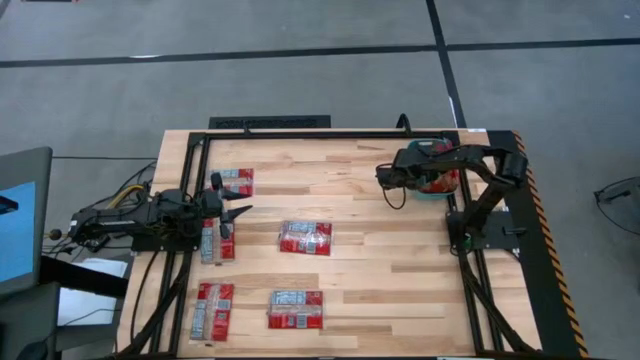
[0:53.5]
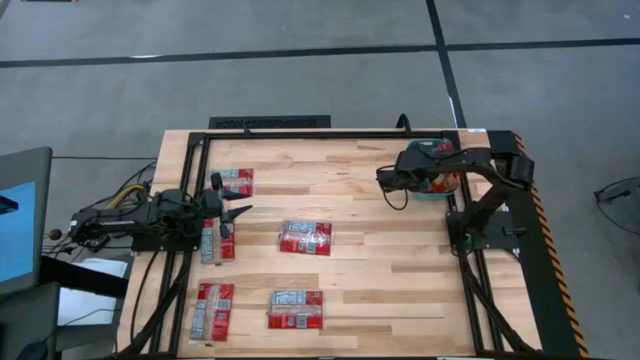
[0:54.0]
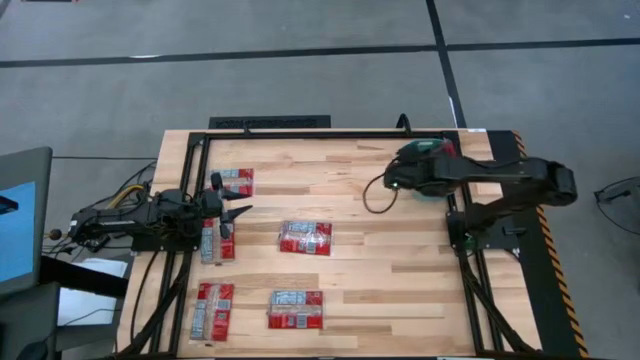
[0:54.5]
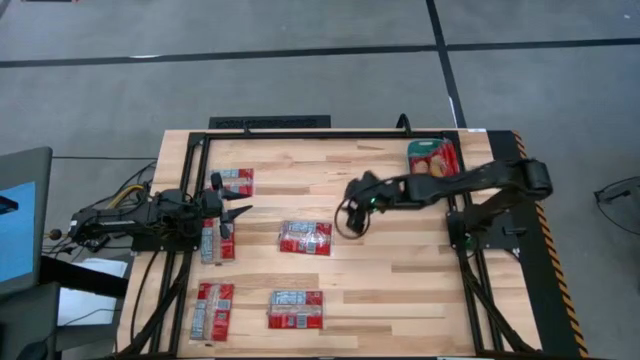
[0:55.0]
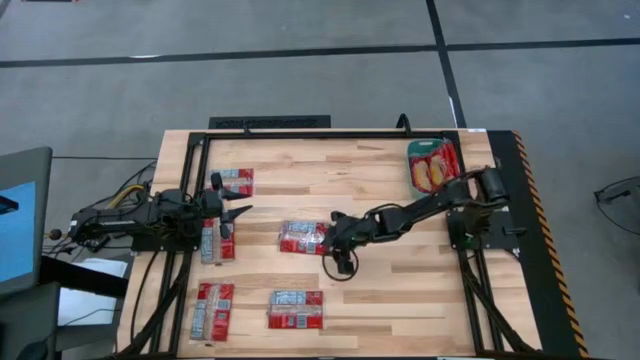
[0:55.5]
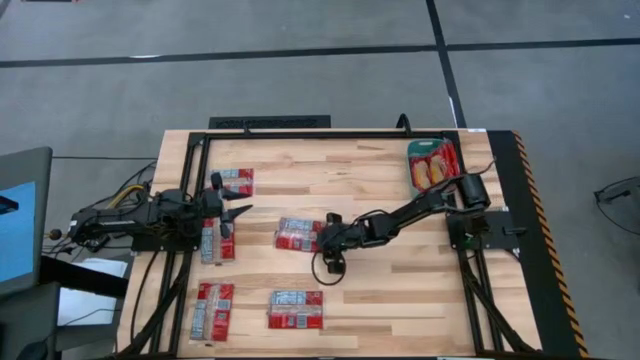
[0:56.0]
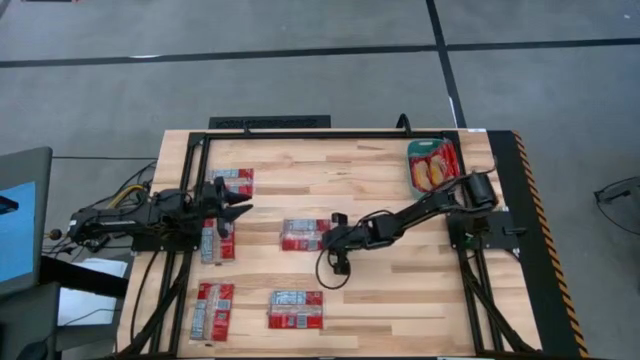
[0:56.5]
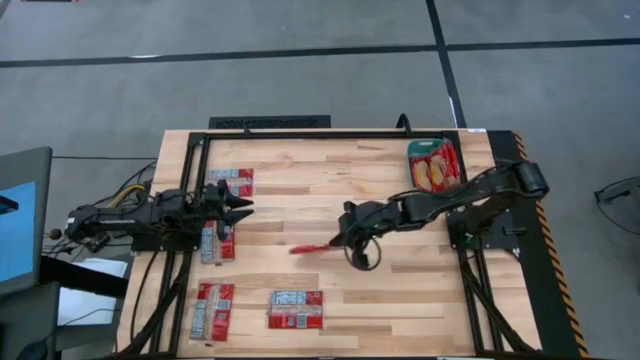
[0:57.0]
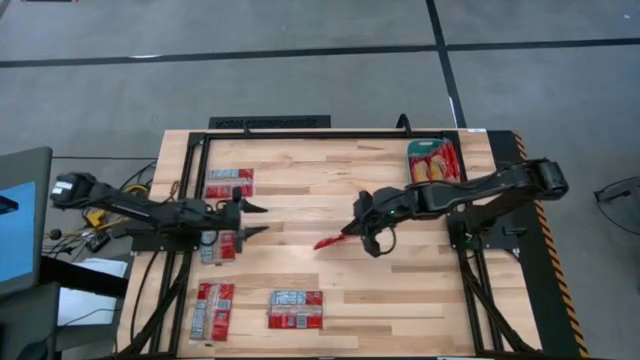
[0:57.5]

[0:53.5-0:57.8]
Task: Sort popcorn bags into baskets
Put the popcorn bag into the green bin

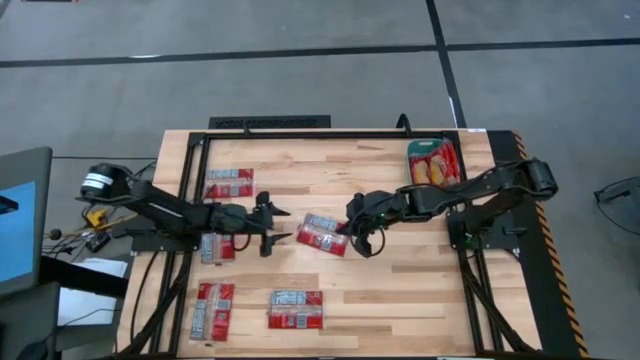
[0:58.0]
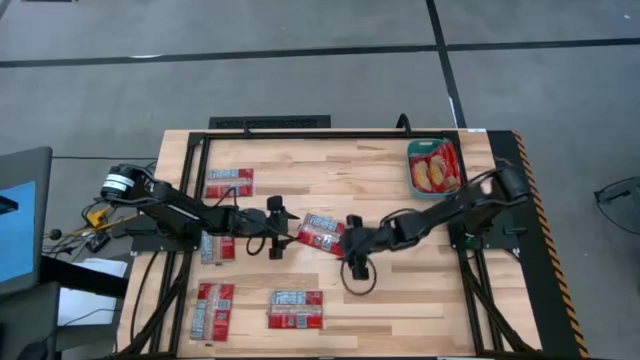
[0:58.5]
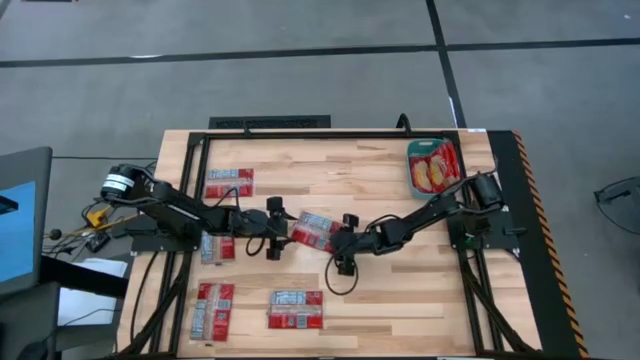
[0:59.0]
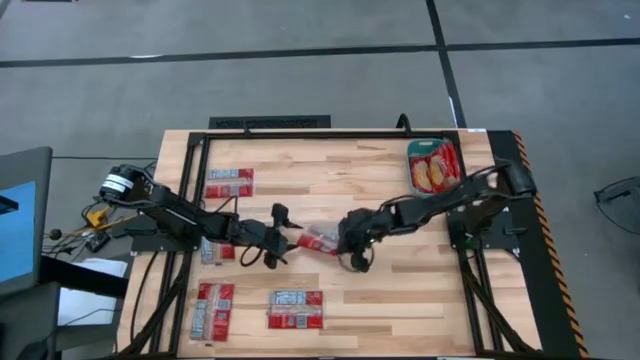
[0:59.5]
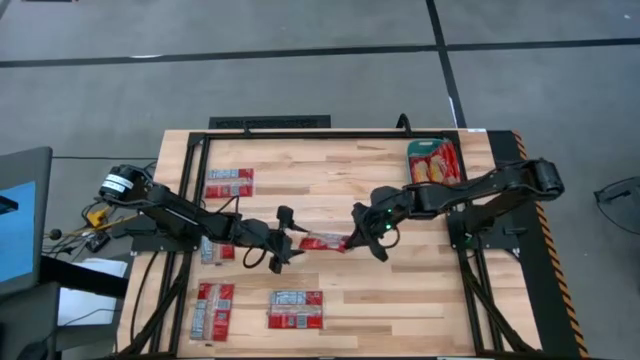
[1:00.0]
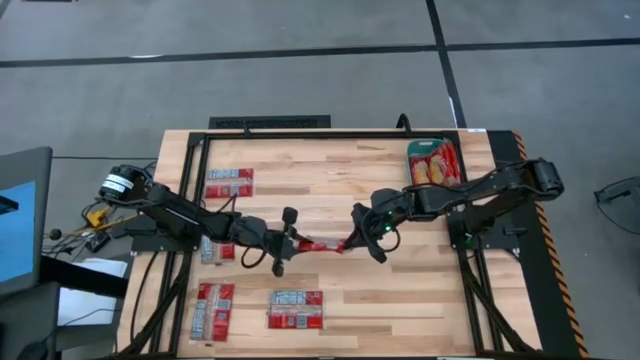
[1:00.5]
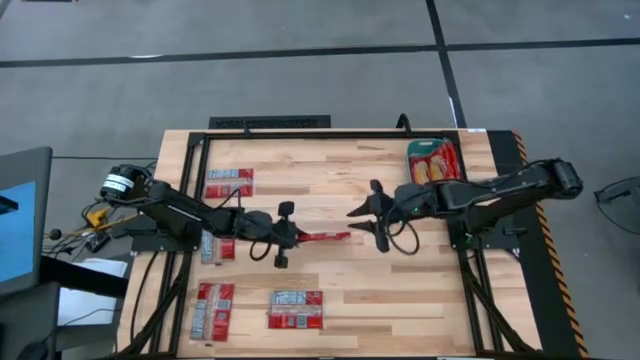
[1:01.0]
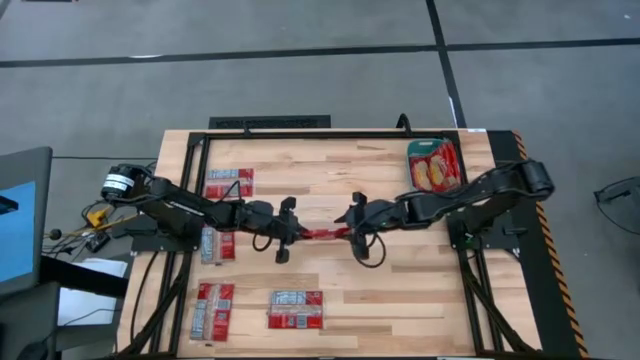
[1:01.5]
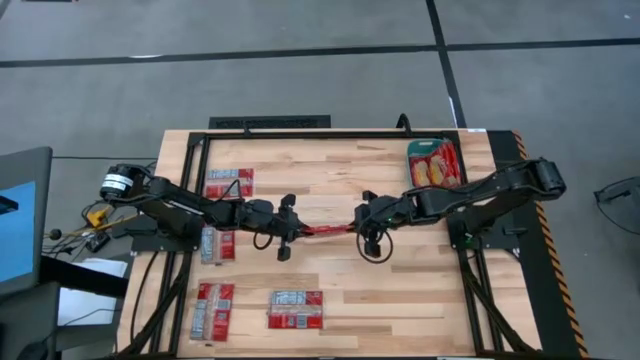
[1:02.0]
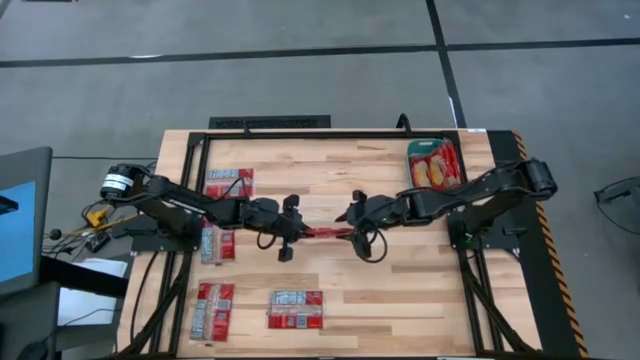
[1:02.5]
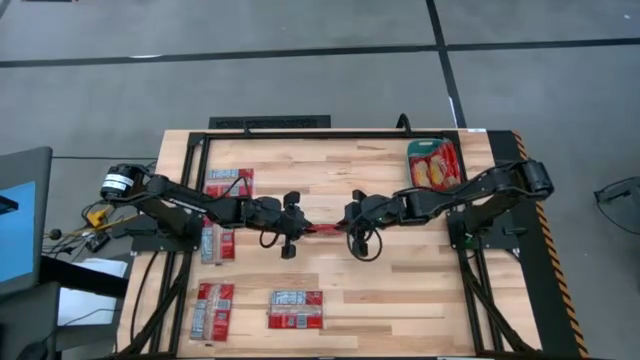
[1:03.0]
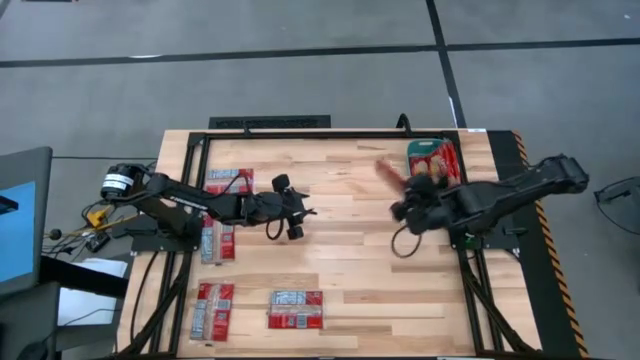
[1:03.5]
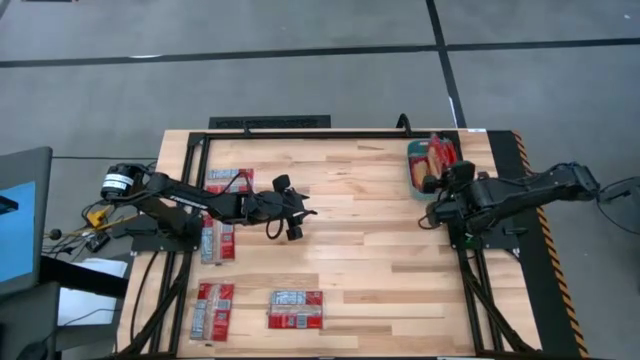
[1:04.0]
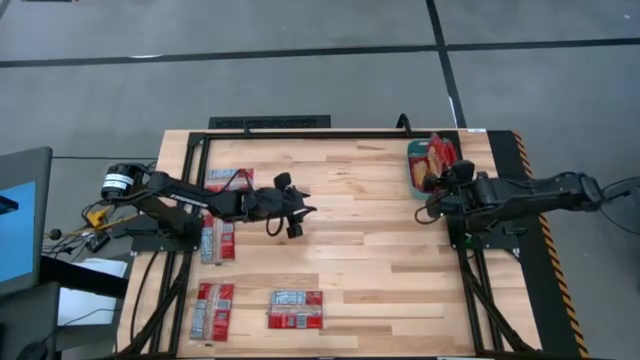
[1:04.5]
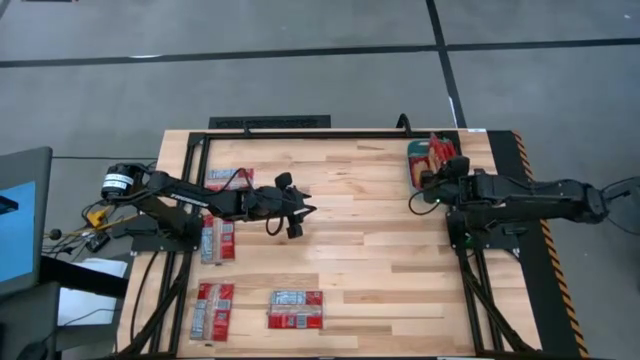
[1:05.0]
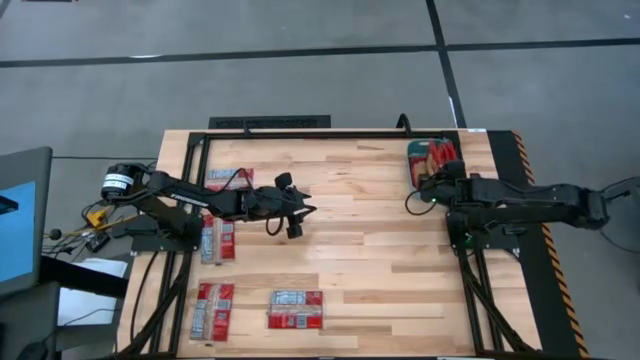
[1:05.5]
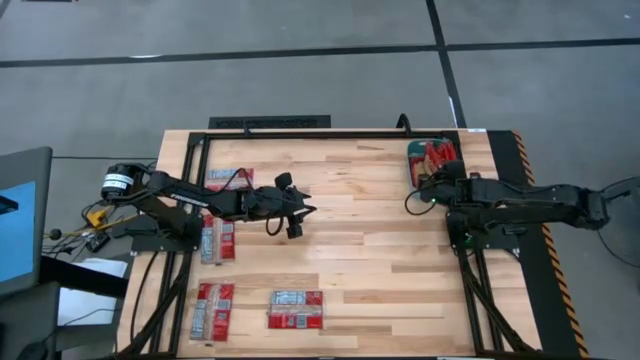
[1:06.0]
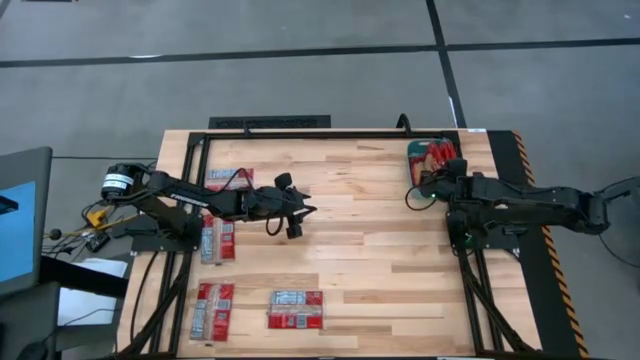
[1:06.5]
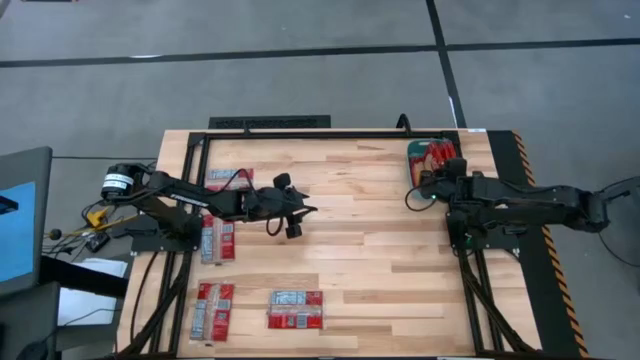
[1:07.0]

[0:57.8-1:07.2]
Put the popcorn bag into the green bin

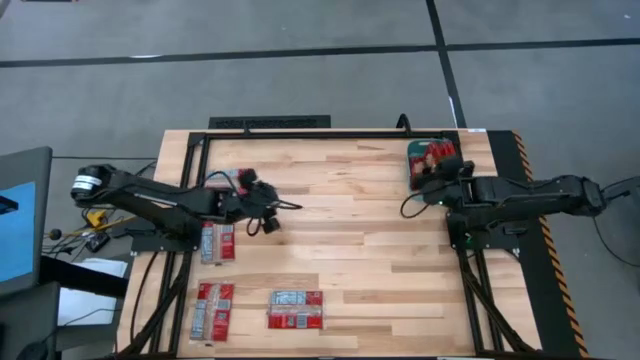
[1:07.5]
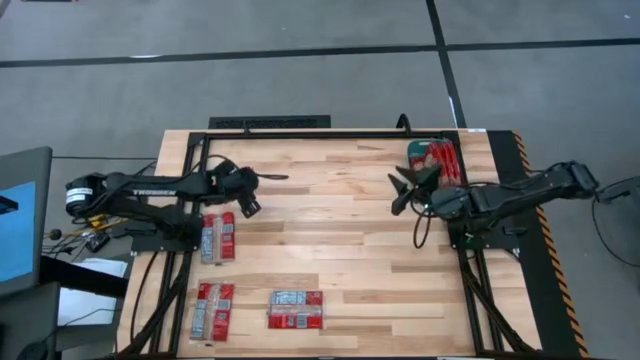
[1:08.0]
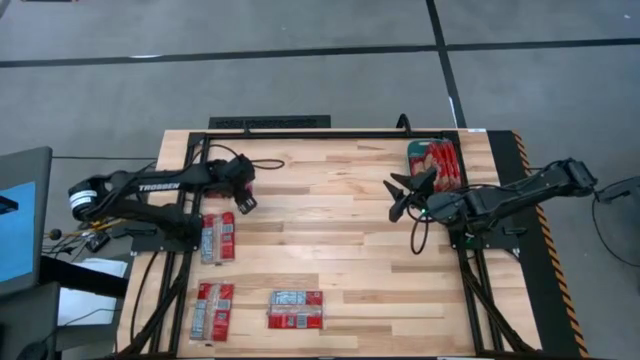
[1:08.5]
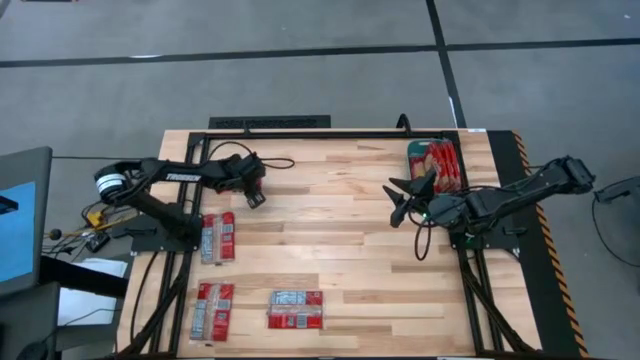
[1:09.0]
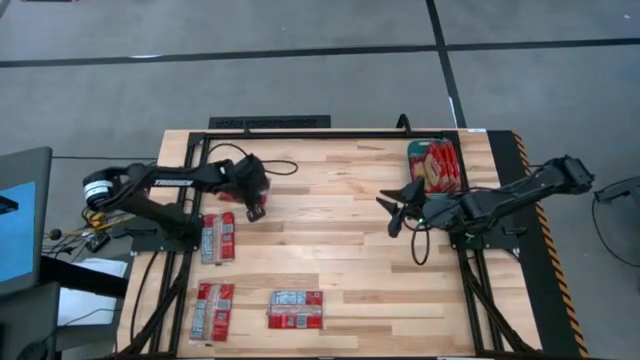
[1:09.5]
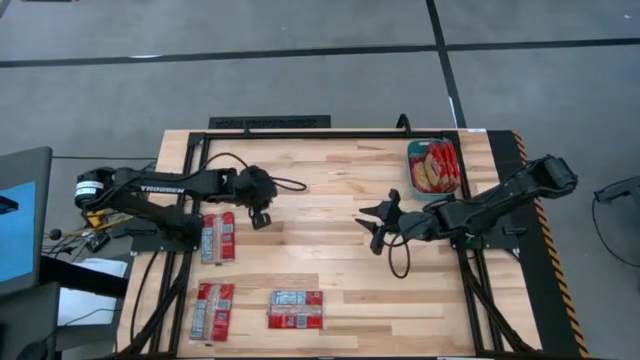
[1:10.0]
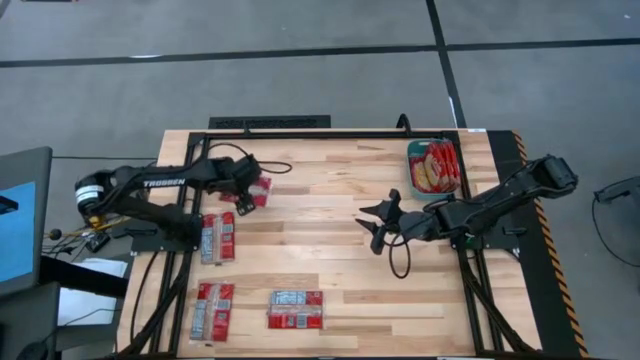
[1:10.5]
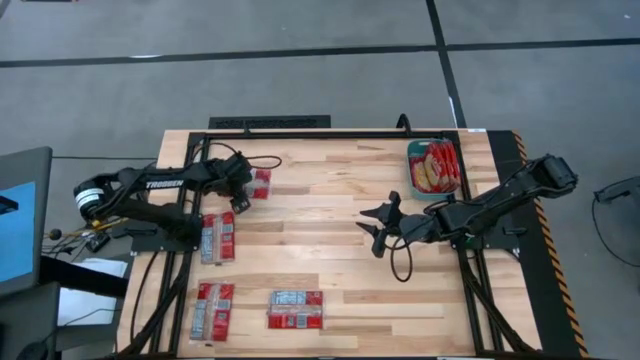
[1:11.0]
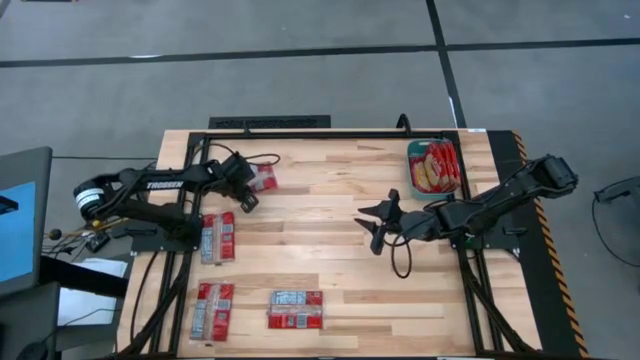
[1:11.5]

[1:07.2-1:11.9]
Put the popcorn bag into the green bin

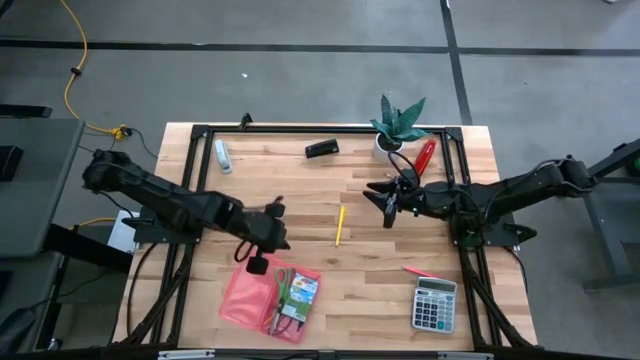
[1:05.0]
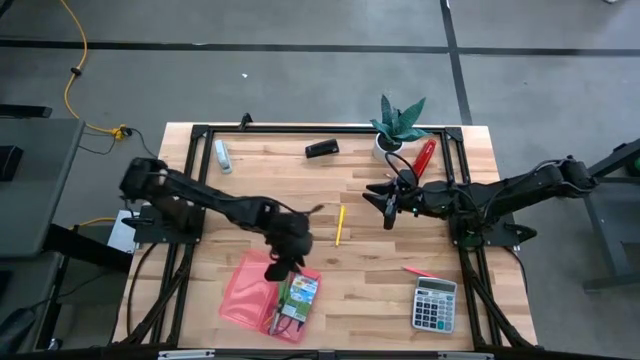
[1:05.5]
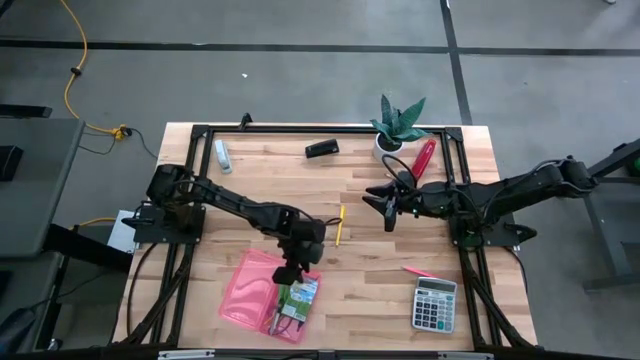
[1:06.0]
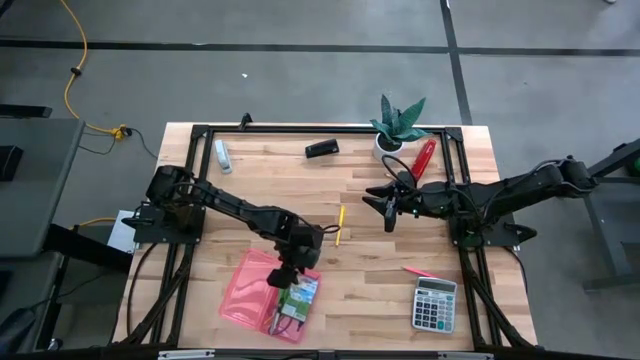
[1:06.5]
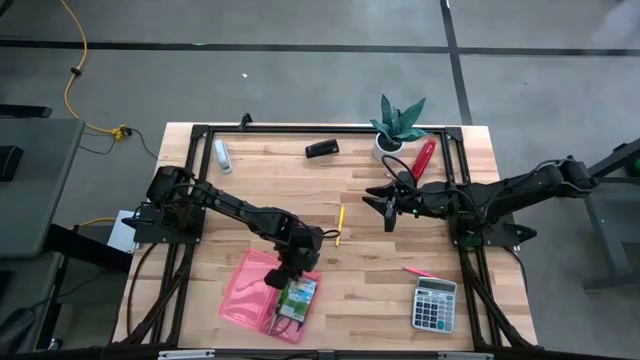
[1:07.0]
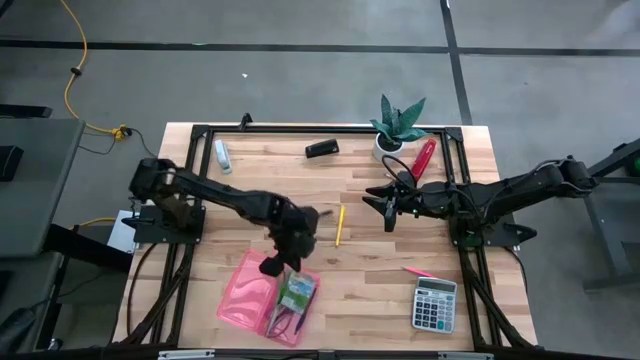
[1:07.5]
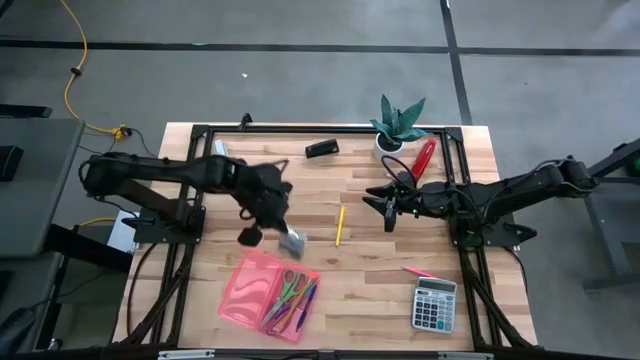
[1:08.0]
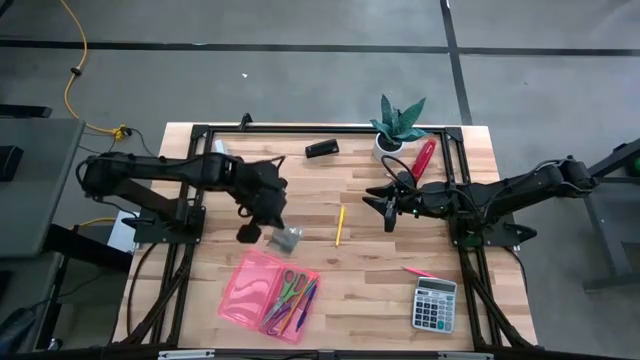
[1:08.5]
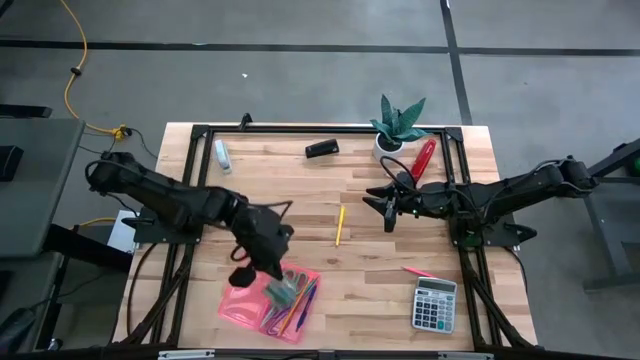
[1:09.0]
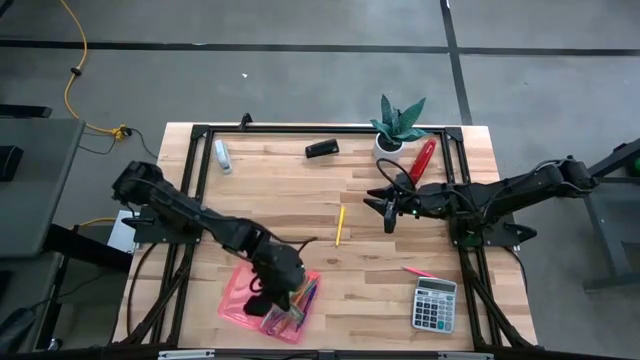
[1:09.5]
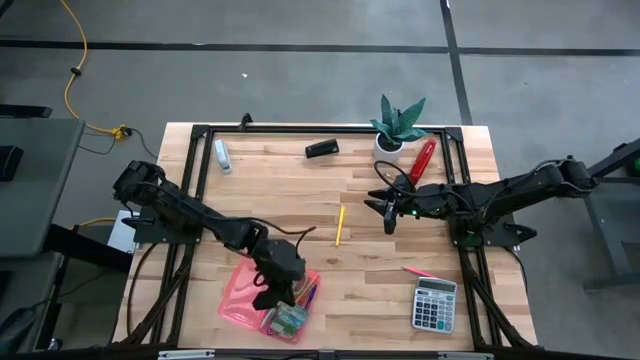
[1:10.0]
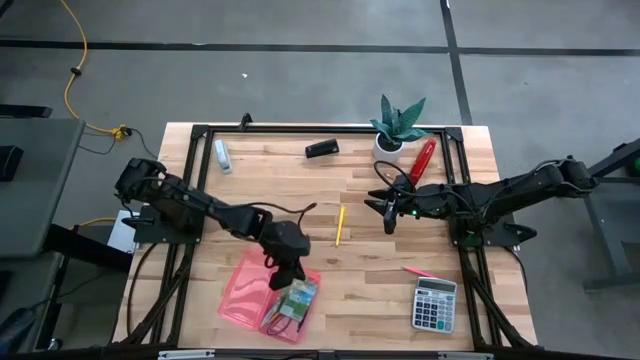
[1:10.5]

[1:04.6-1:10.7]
Task: Pack school essentials
Adjust the crayon box in the supply box to maximize the space
